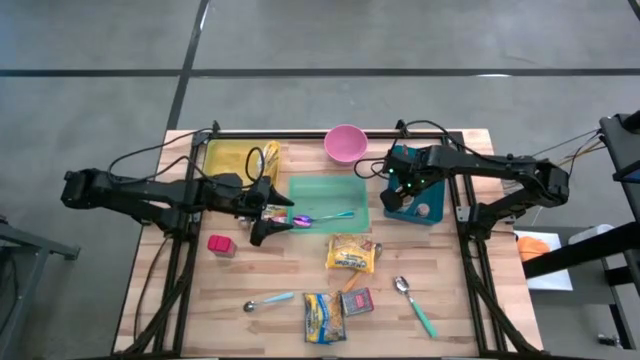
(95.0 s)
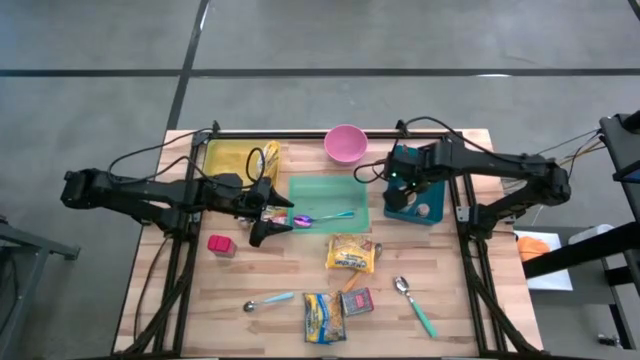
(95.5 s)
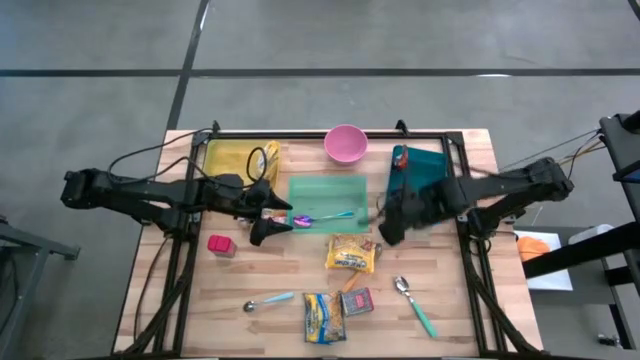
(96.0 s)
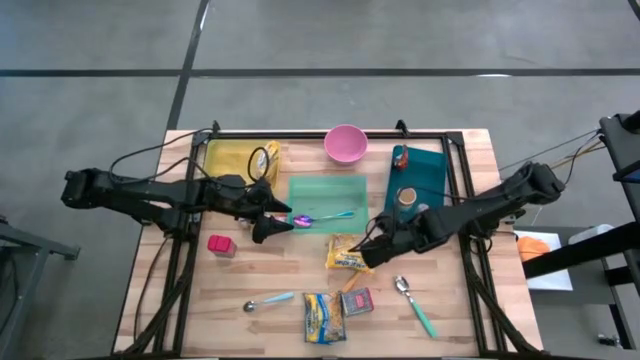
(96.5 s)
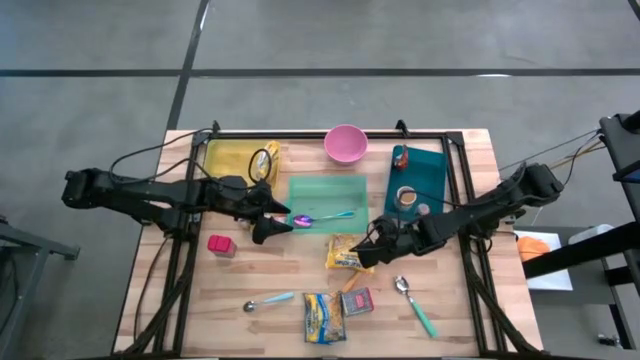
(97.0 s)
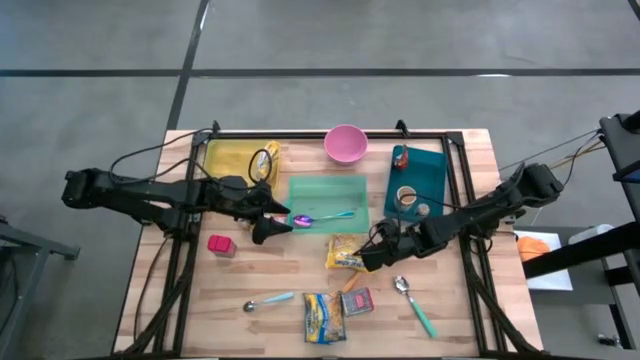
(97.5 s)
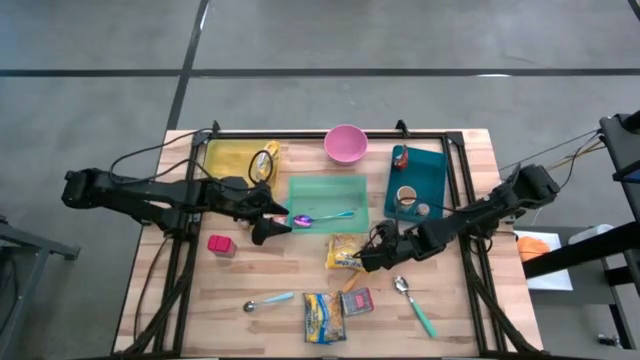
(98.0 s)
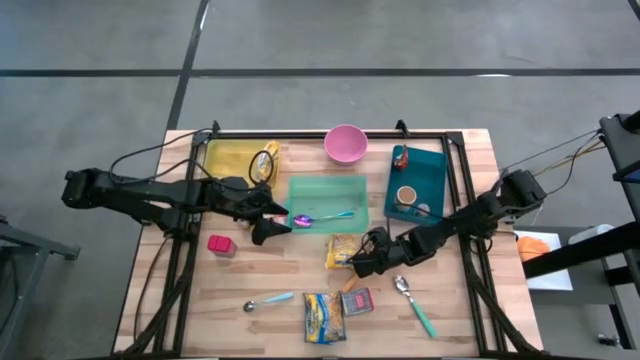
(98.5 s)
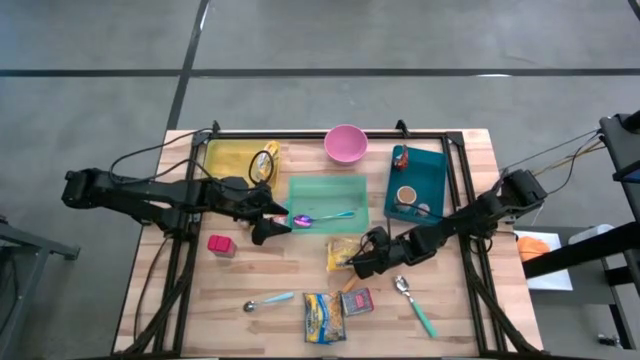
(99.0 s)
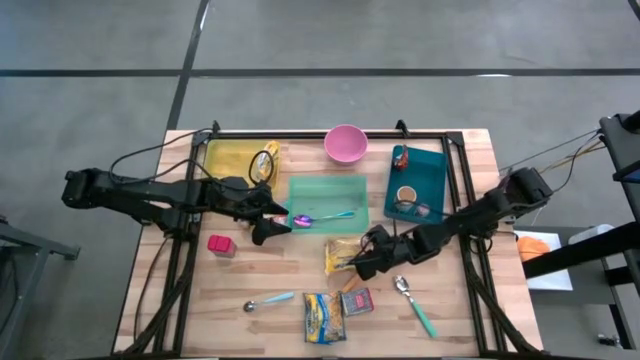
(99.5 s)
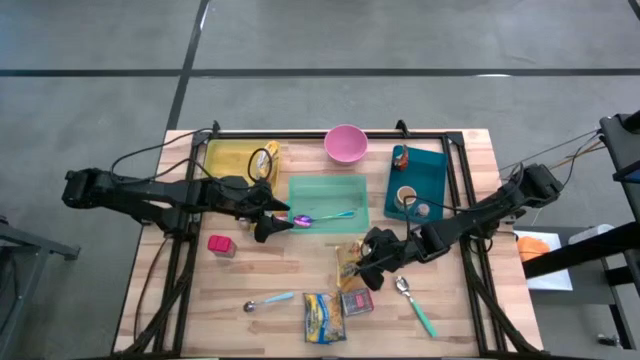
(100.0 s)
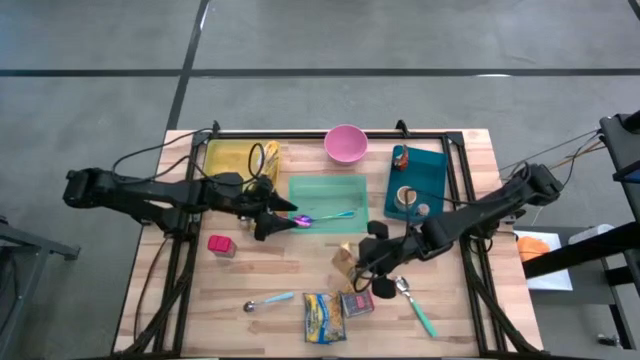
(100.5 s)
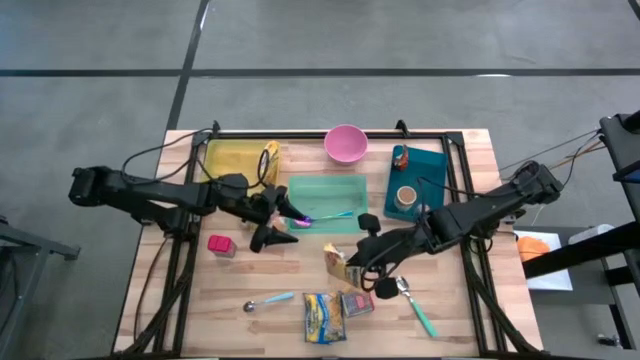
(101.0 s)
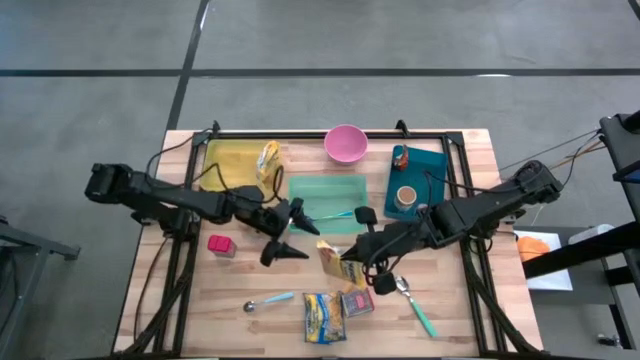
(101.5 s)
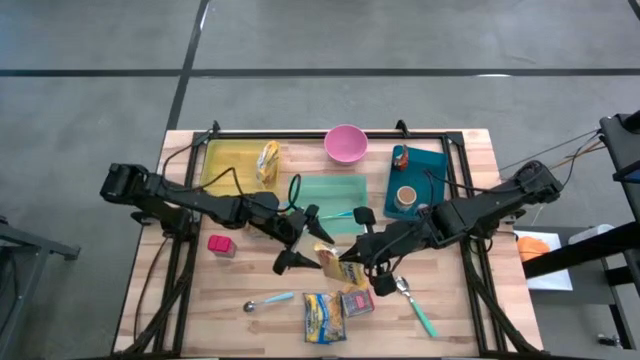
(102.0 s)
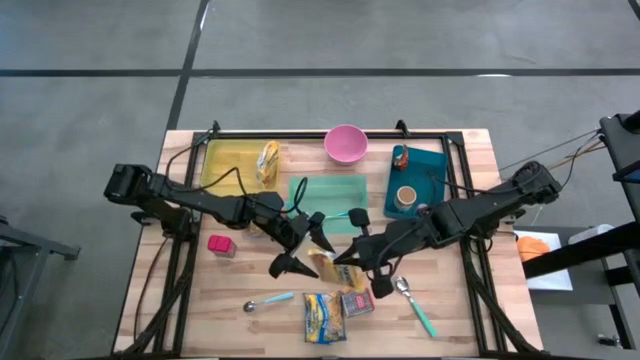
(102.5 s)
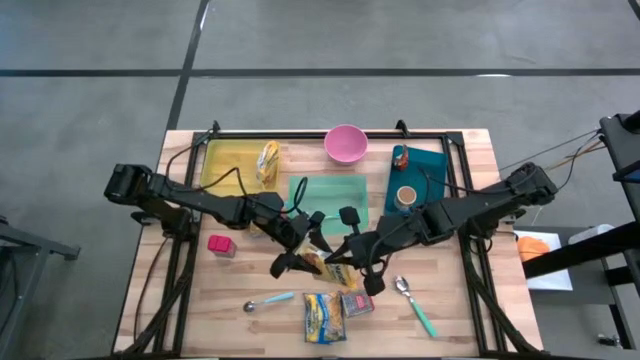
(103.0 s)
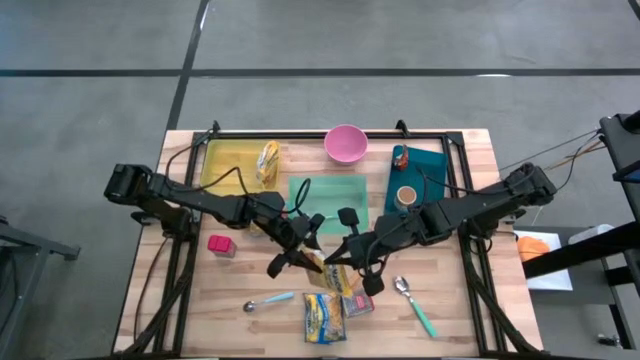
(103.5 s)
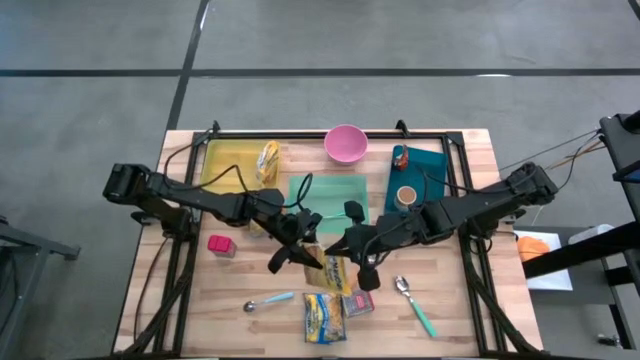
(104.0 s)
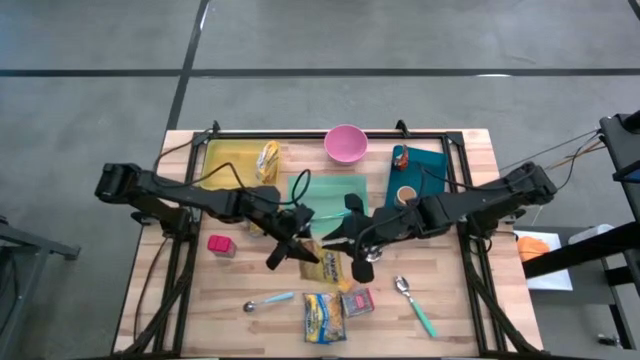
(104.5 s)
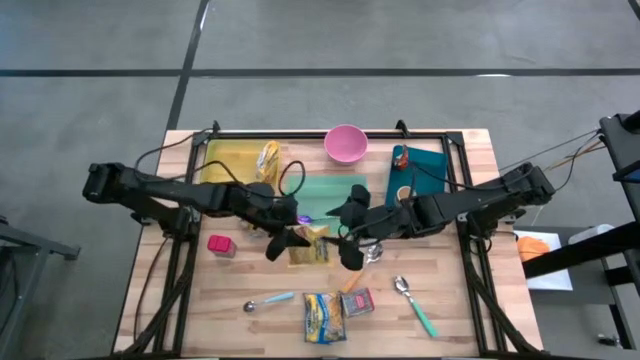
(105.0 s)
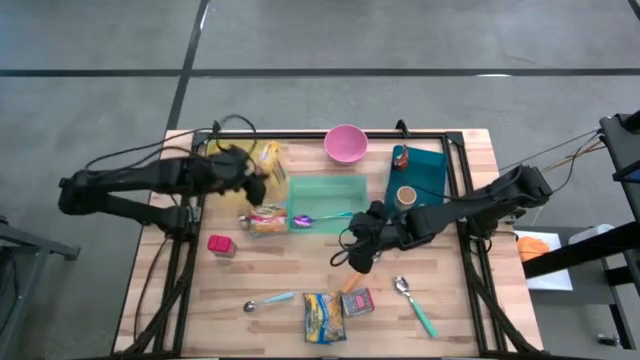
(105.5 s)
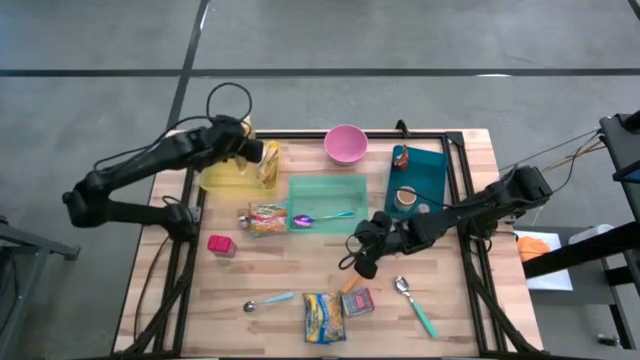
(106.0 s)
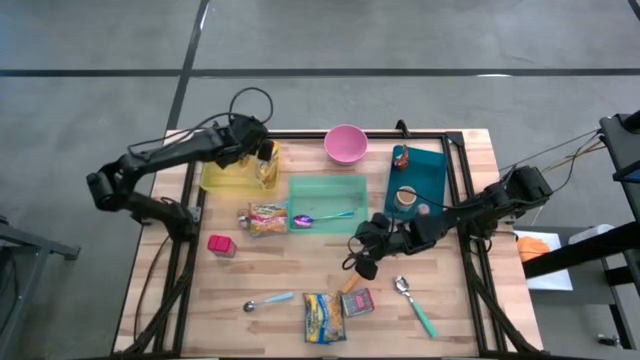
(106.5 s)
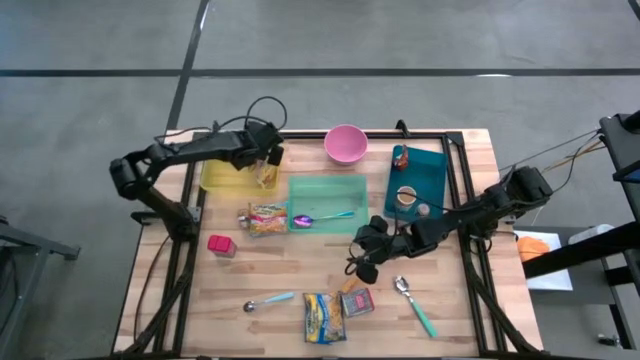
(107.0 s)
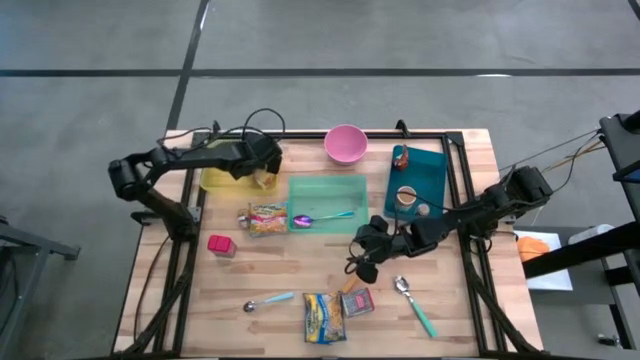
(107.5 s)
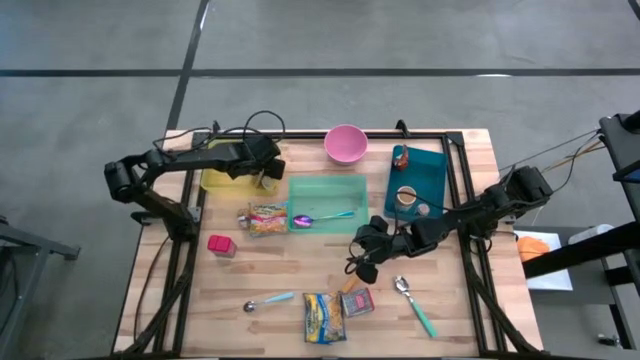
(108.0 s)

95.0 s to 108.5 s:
Put the yellow noodle pack into the yellow bin

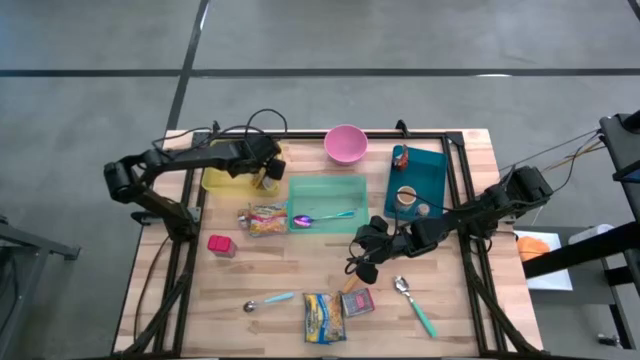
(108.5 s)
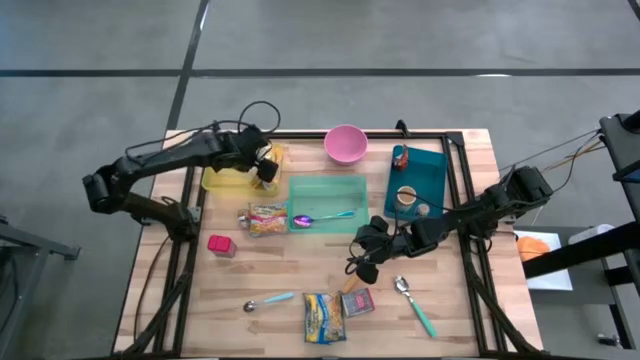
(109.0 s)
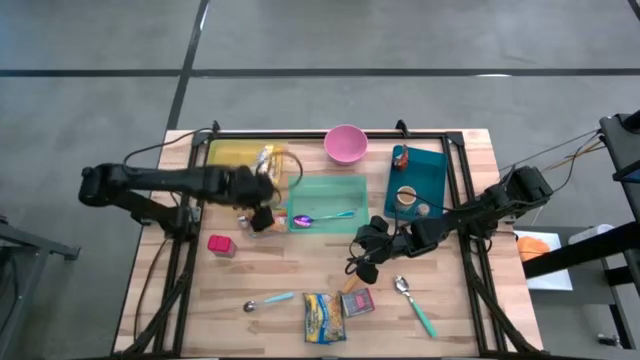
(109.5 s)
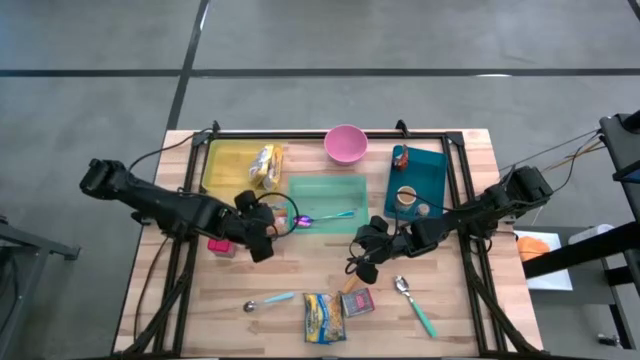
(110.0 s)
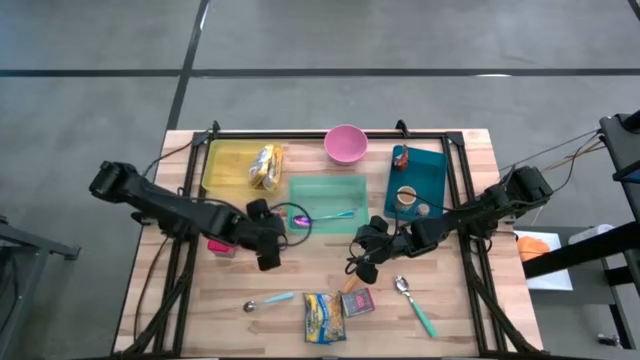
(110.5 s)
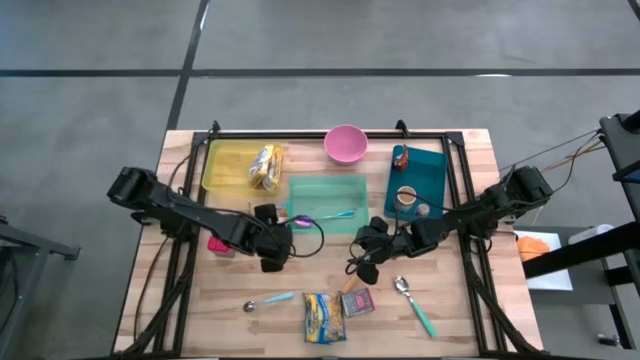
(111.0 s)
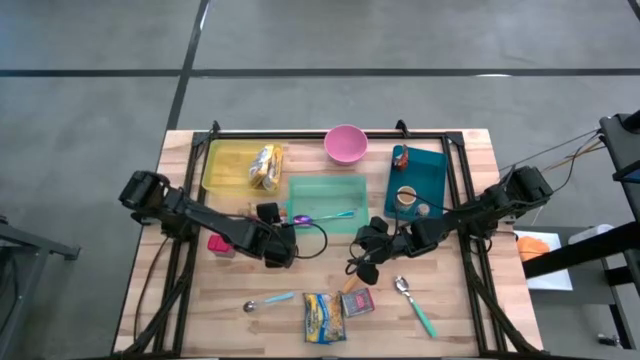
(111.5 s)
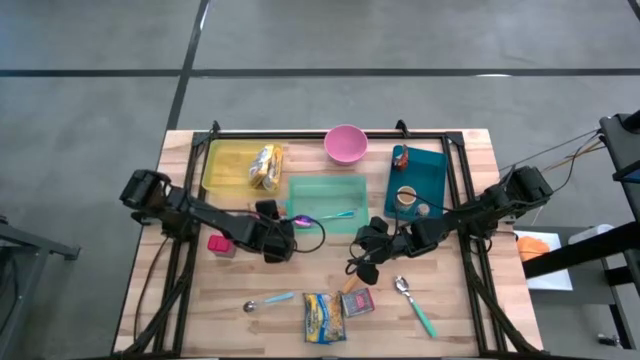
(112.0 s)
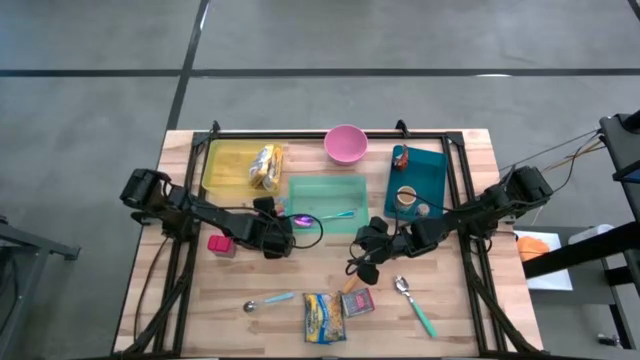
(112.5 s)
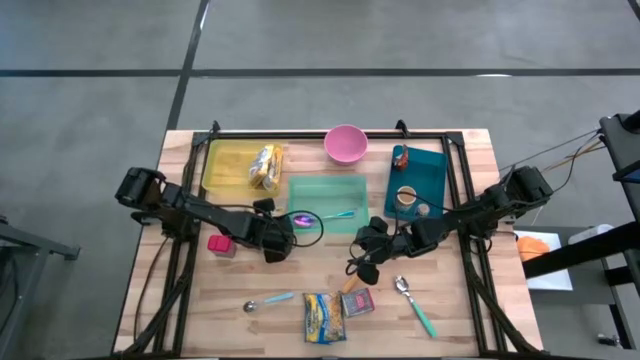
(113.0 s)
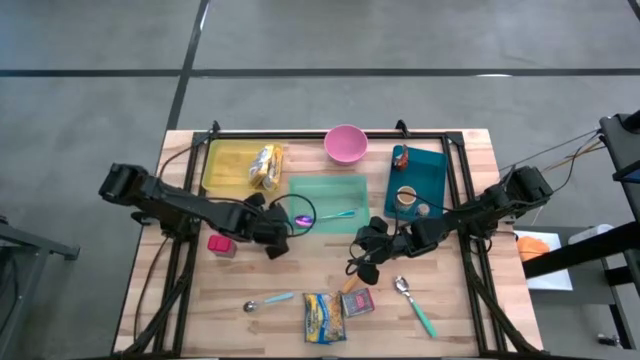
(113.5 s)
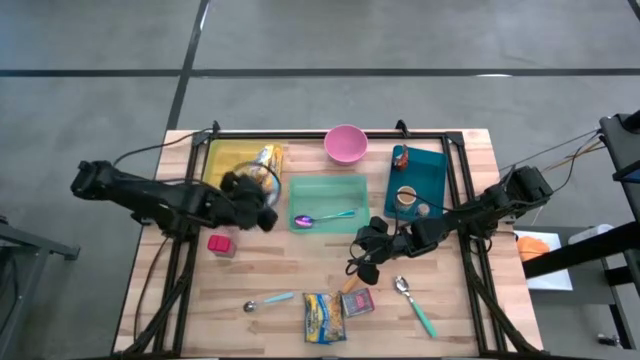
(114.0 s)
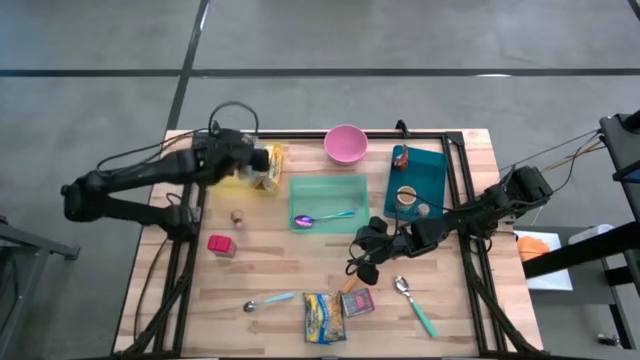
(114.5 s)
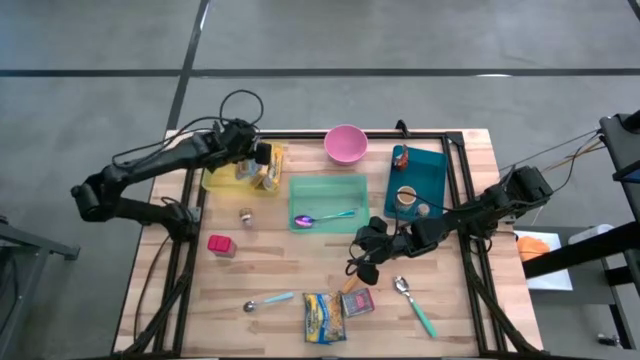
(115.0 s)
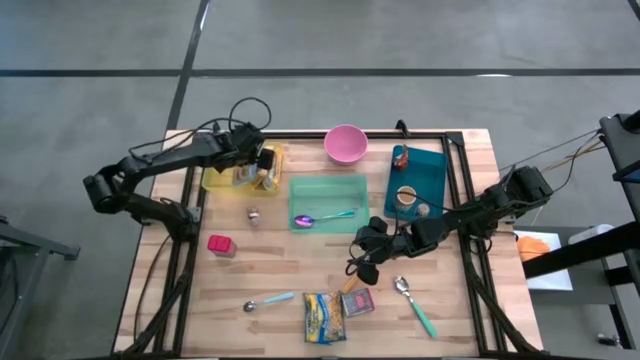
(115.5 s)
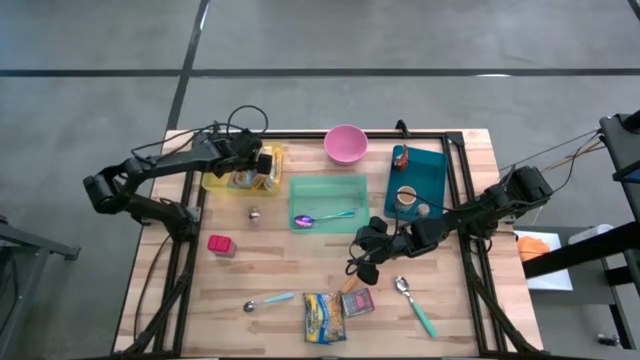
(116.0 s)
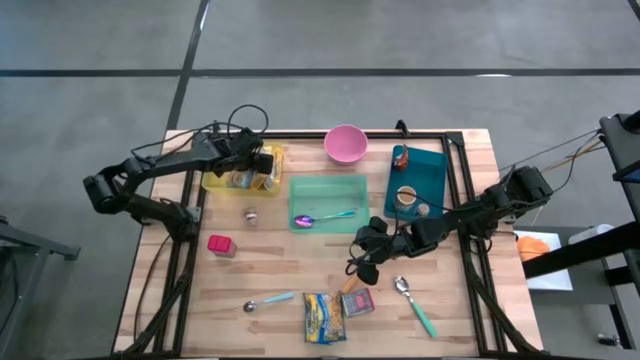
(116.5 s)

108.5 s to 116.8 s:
Put the light blue noodle pack into the yellow bin
